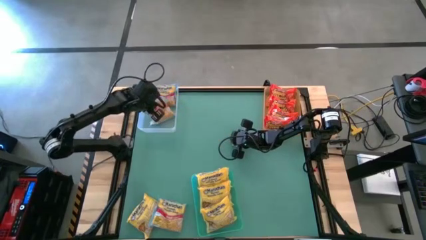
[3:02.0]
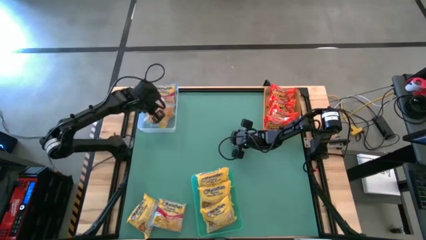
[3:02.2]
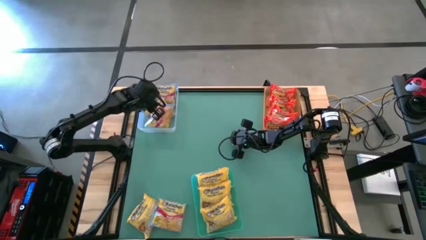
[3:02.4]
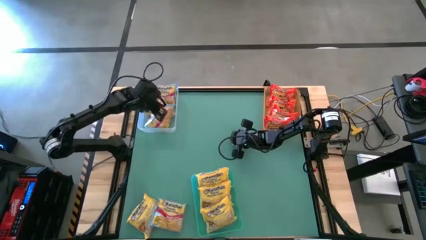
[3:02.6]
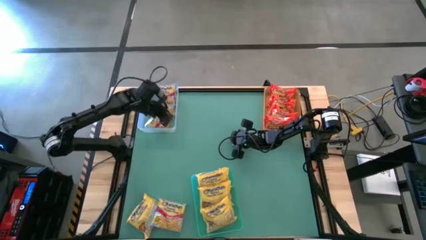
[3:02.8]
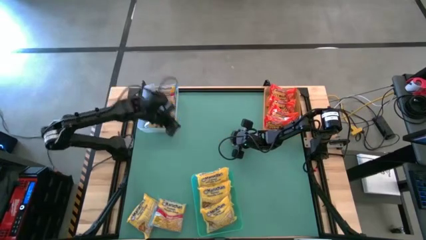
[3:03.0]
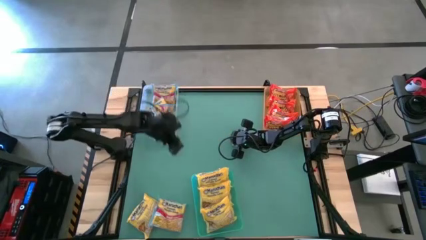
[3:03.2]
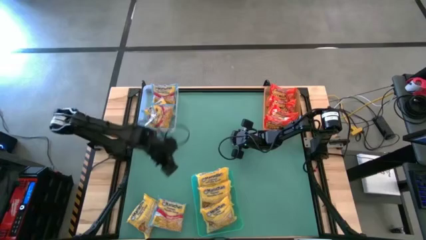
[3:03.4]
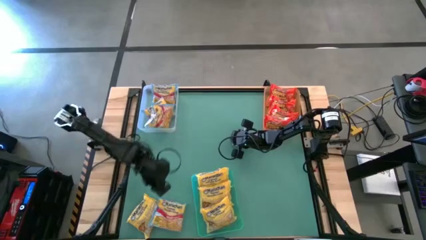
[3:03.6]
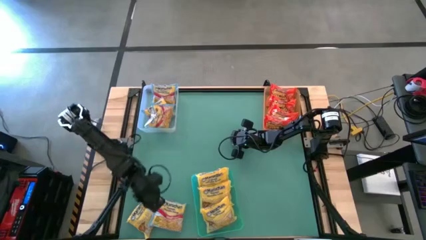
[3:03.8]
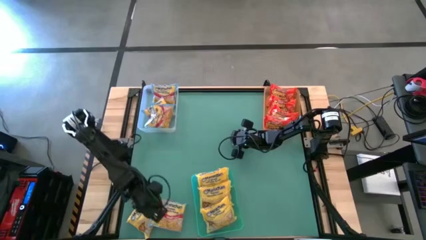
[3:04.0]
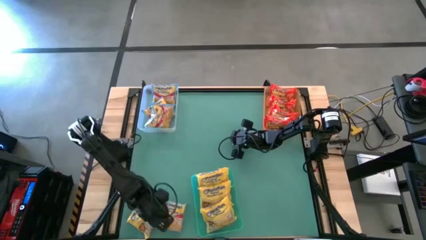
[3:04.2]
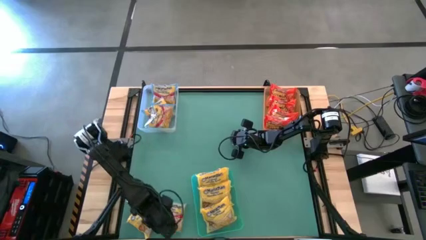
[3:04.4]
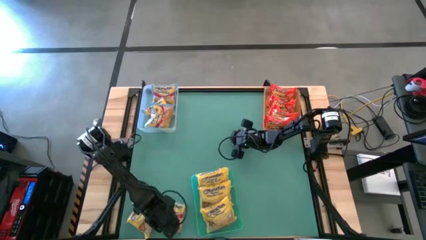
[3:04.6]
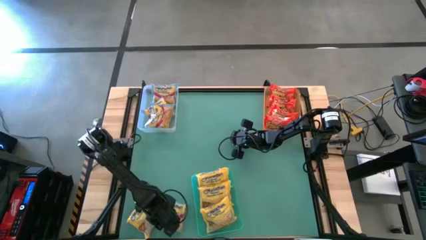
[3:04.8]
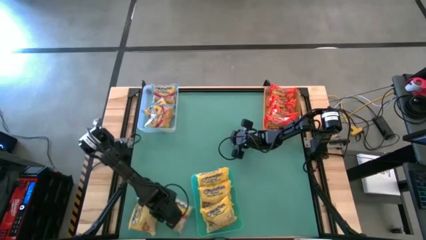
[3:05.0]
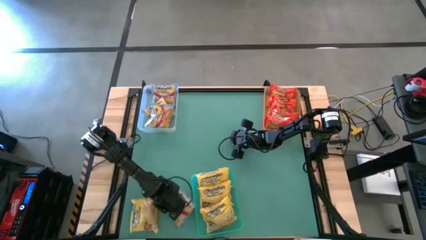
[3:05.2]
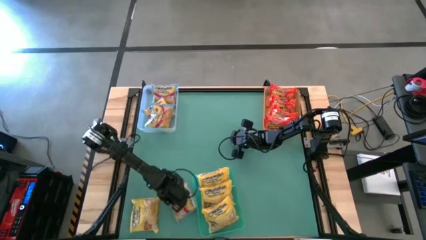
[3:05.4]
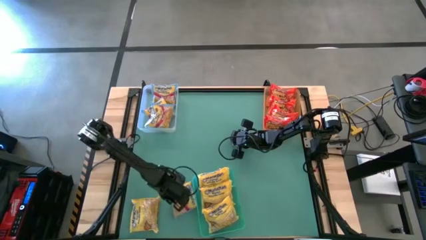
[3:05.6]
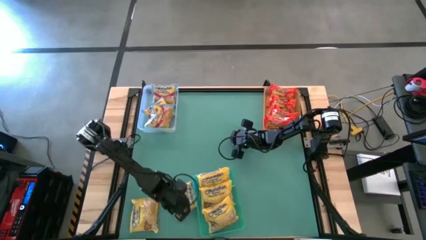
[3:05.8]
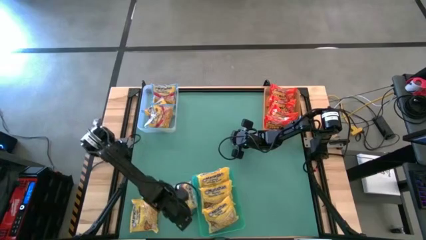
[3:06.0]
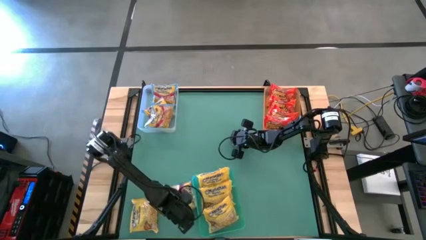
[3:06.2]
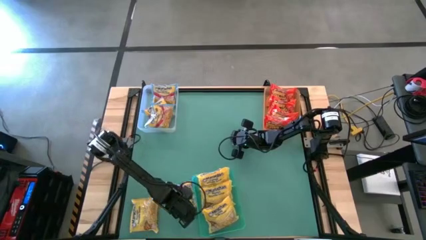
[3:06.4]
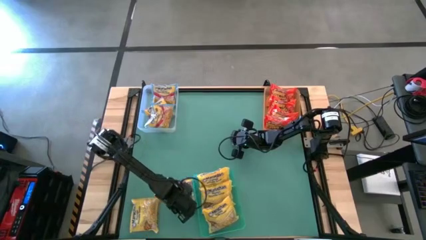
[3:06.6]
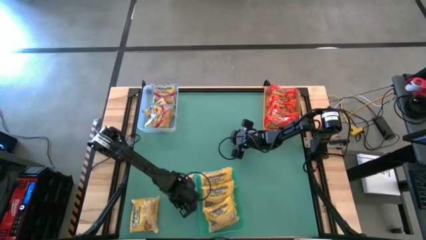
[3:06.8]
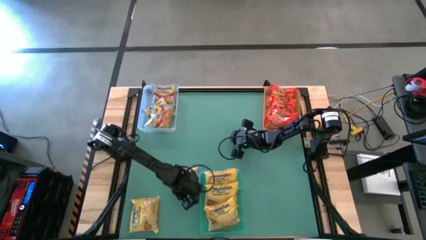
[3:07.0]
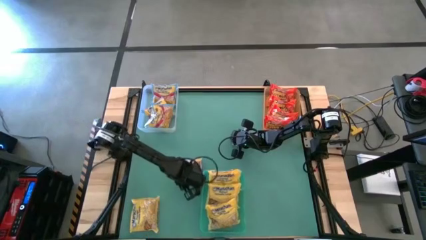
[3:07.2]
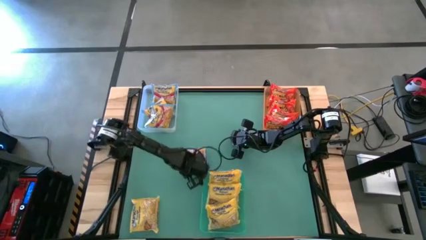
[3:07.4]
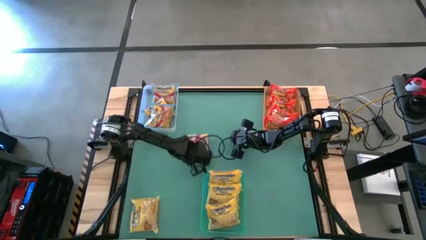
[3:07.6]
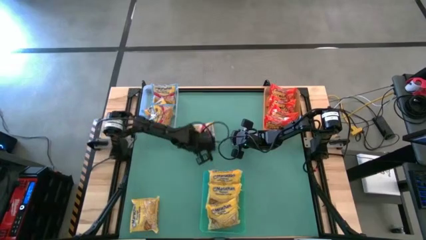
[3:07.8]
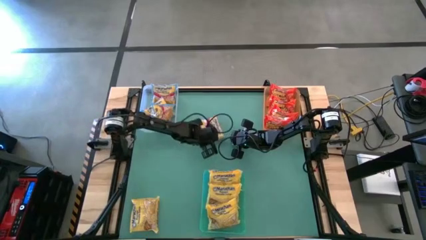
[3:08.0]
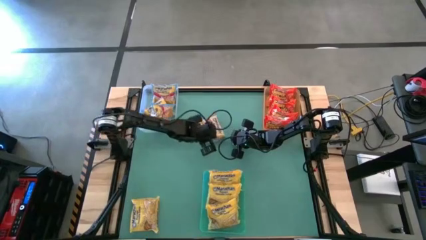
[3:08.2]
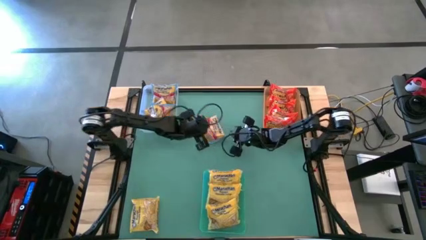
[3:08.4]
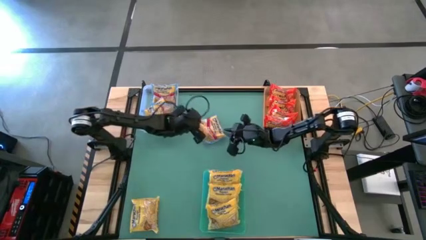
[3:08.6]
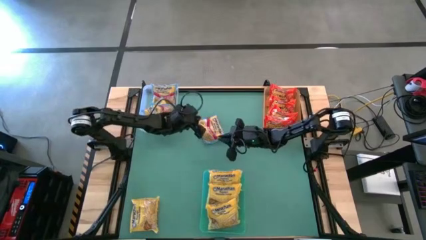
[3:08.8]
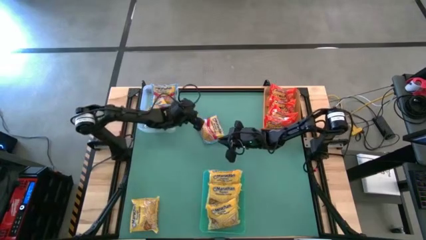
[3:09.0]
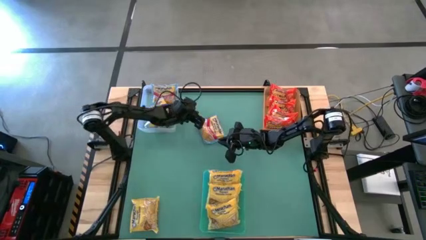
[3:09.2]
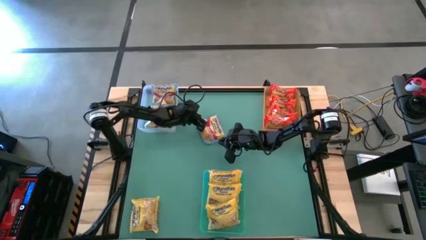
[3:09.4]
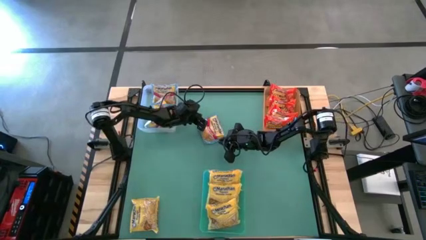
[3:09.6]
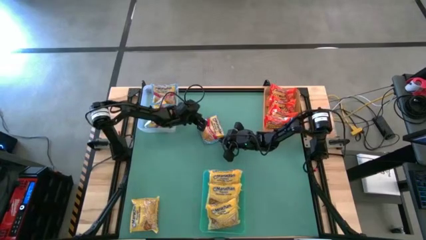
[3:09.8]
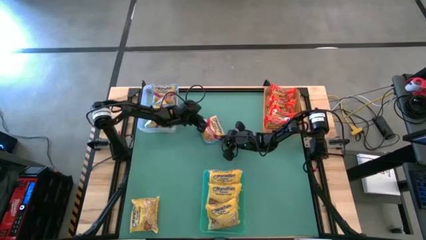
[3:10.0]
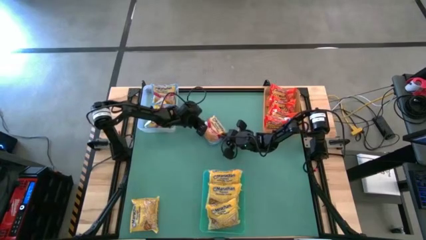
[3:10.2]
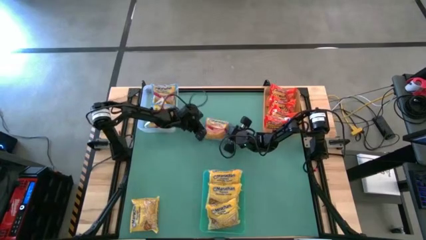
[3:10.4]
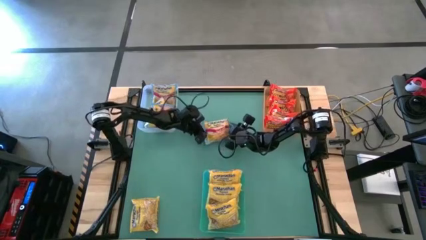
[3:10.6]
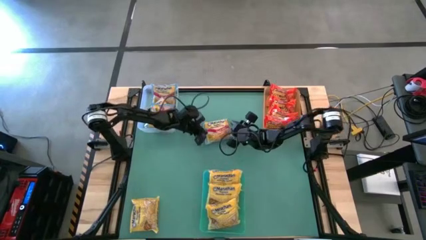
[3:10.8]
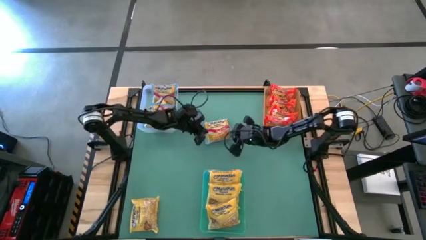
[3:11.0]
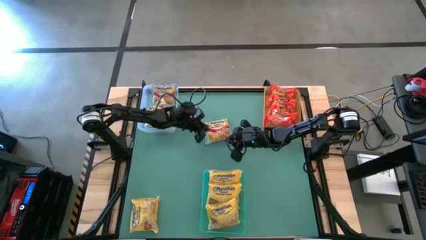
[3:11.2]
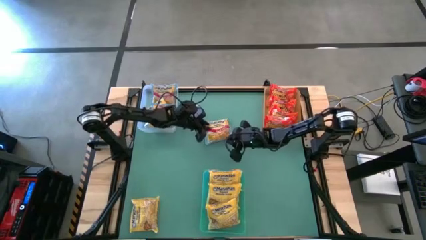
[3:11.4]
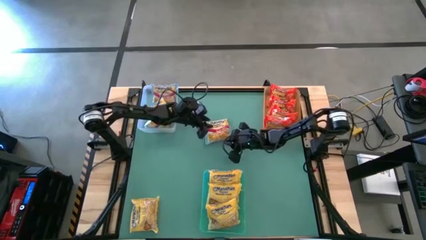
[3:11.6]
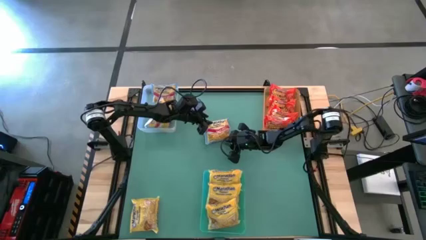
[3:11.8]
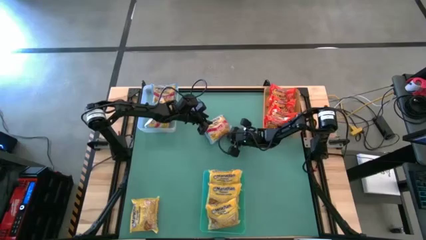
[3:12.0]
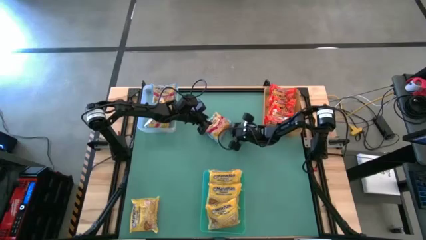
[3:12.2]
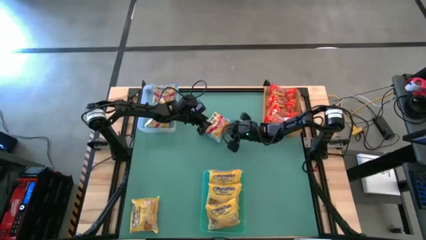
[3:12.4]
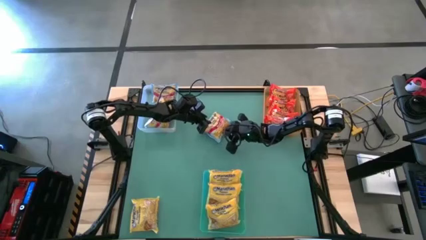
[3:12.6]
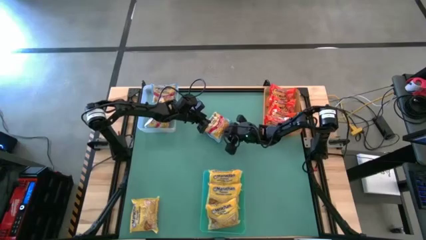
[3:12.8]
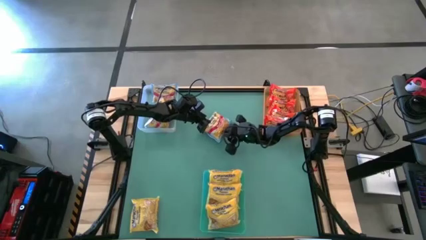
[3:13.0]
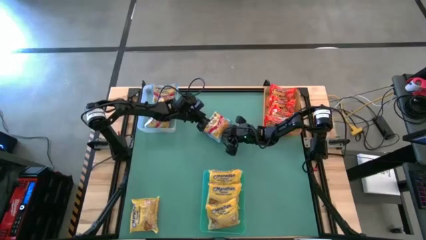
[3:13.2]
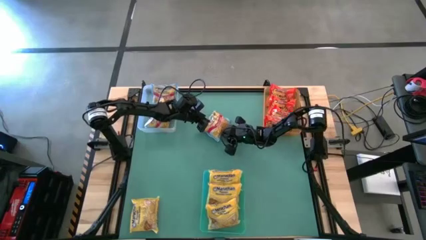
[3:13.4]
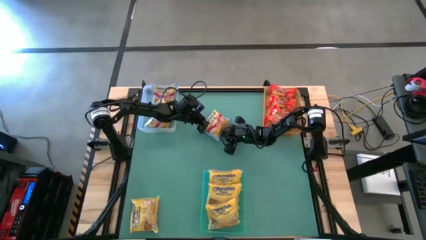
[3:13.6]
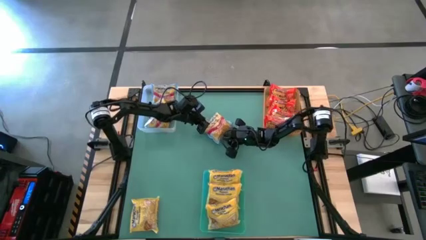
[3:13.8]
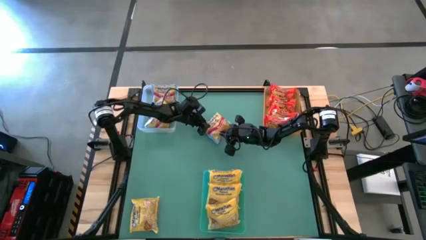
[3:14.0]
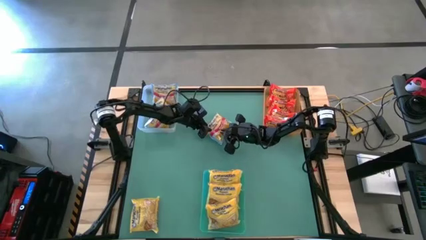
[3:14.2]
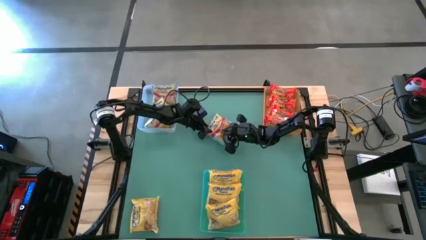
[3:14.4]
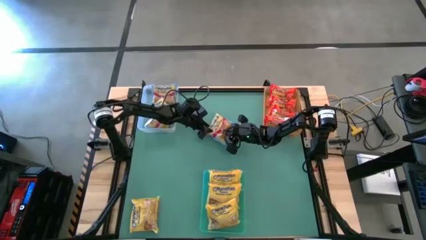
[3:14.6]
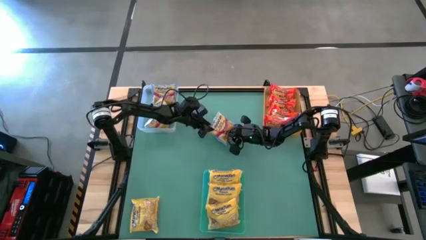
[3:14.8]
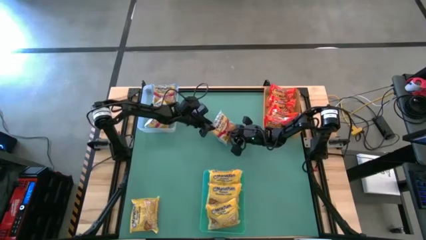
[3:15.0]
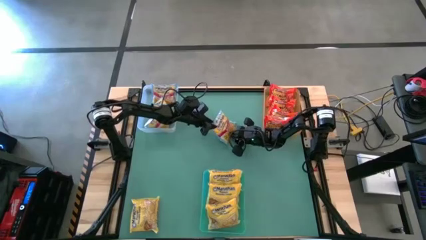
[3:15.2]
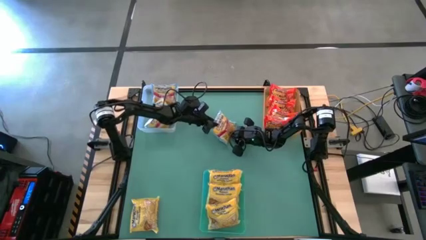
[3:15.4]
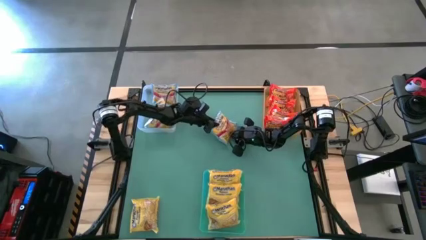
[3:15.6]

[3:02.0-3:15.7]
Task: Sort Maruchan noodles
Put the blue noodle pack into the transparent bin
